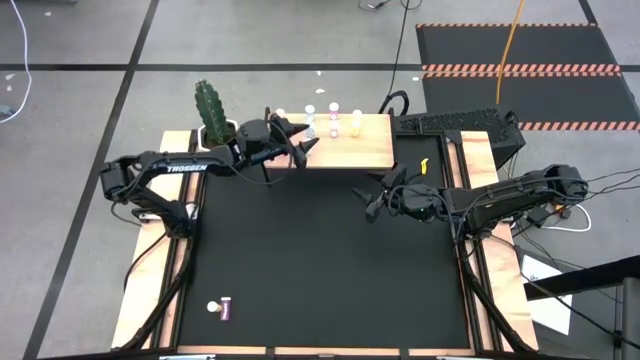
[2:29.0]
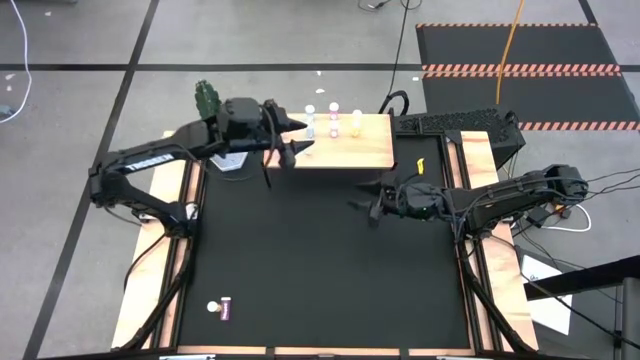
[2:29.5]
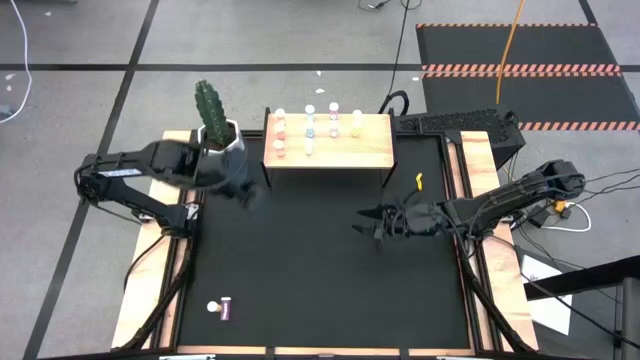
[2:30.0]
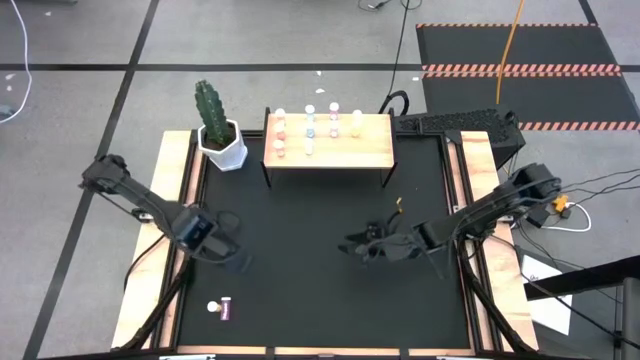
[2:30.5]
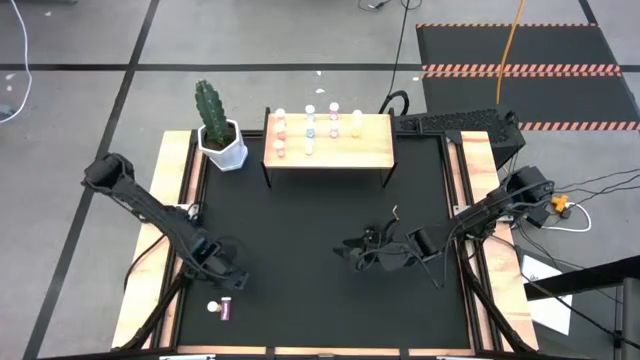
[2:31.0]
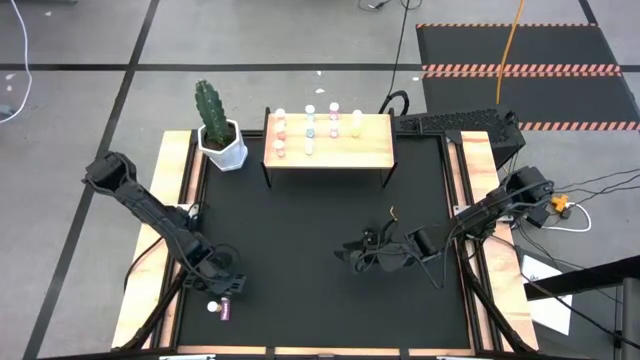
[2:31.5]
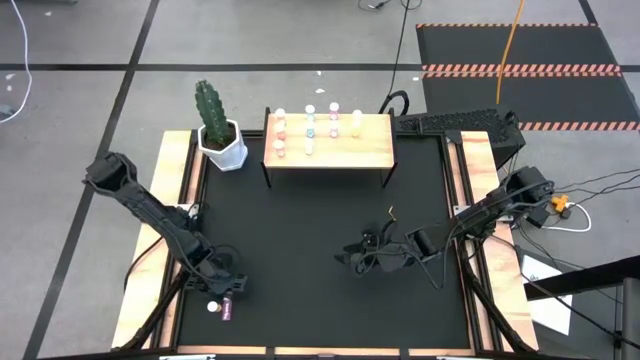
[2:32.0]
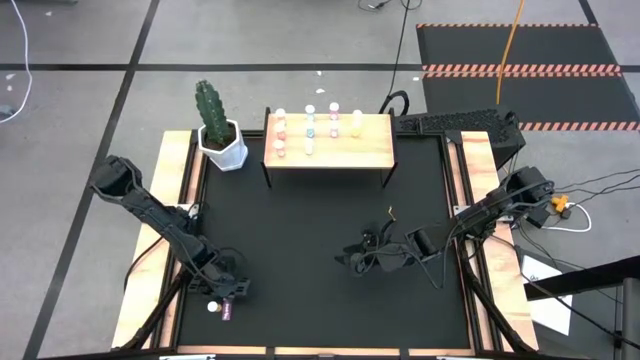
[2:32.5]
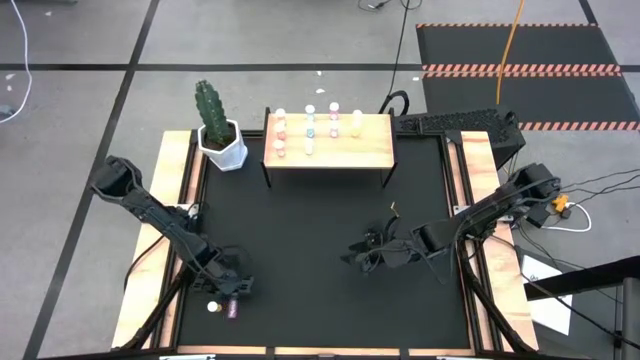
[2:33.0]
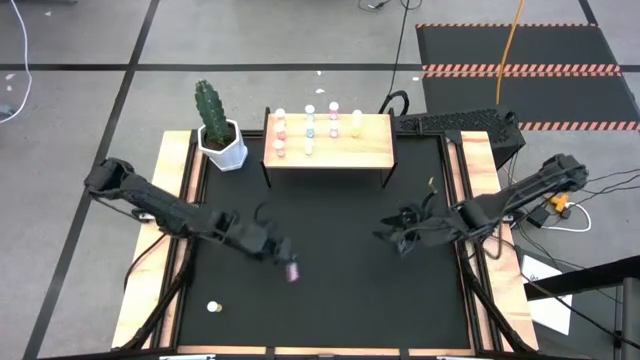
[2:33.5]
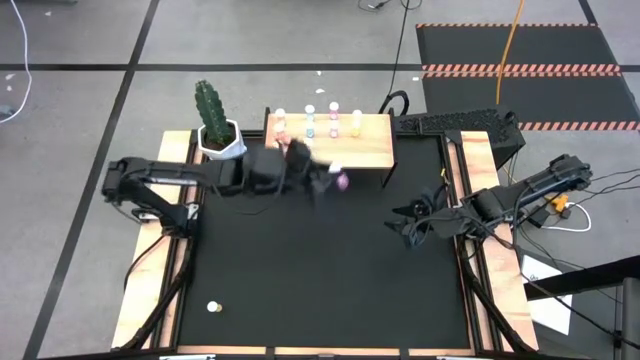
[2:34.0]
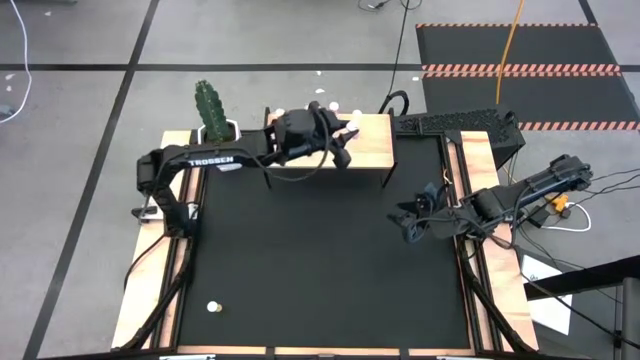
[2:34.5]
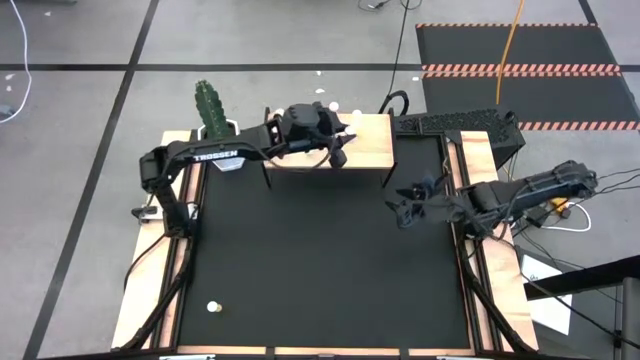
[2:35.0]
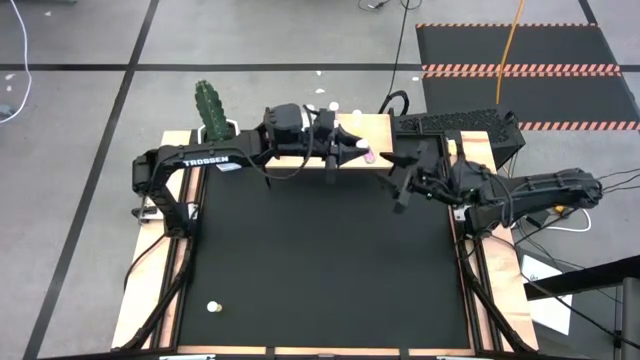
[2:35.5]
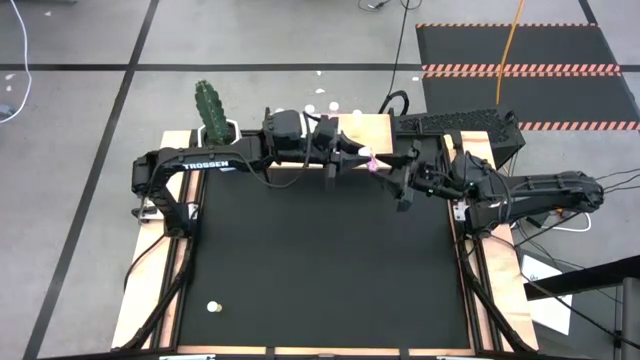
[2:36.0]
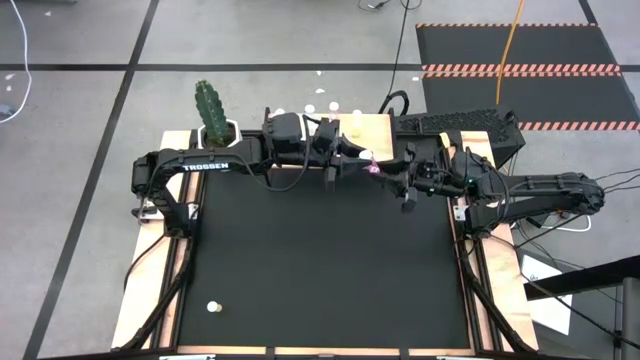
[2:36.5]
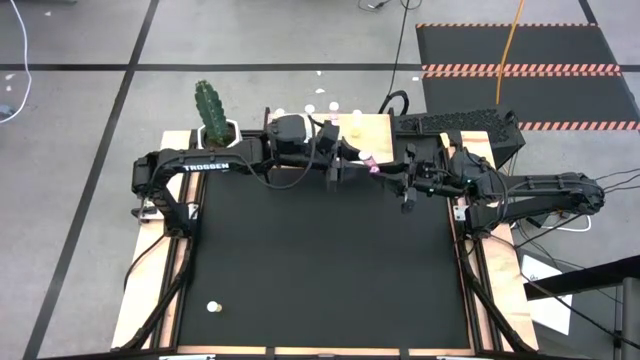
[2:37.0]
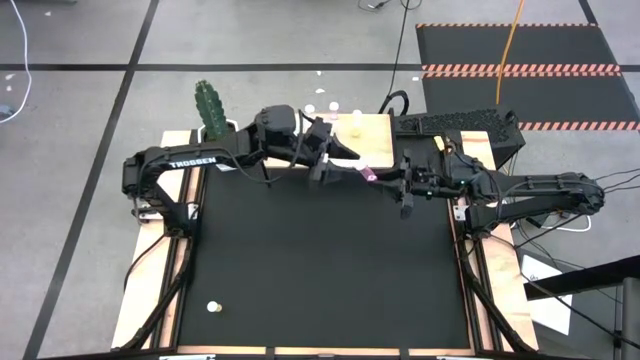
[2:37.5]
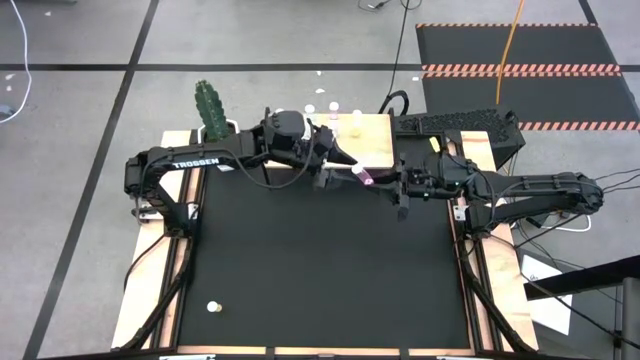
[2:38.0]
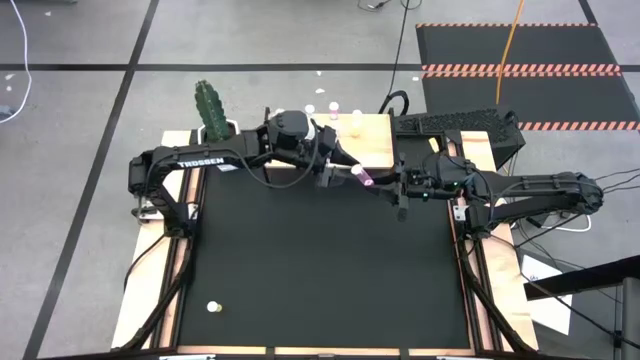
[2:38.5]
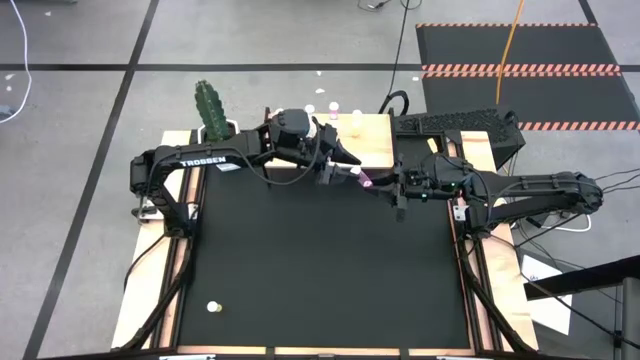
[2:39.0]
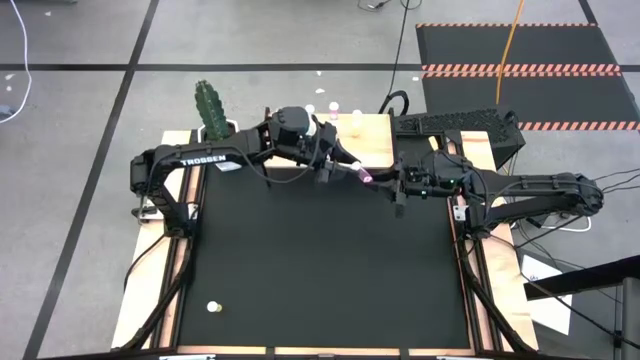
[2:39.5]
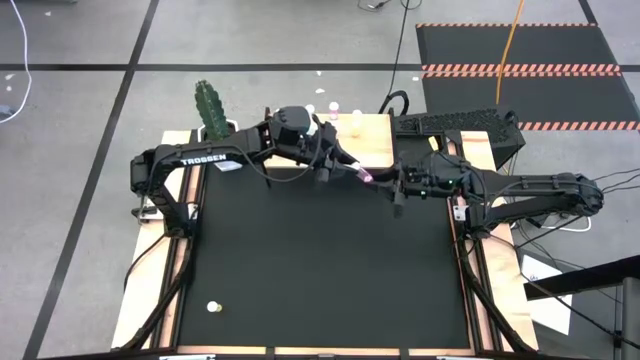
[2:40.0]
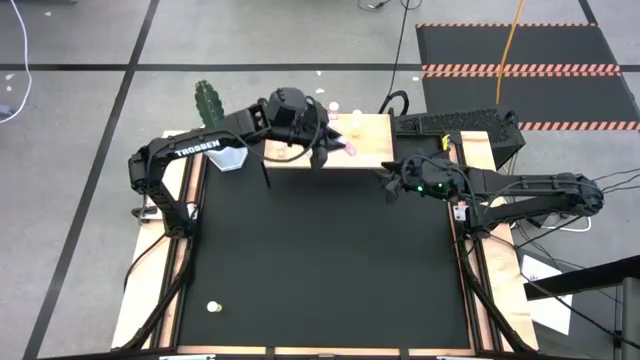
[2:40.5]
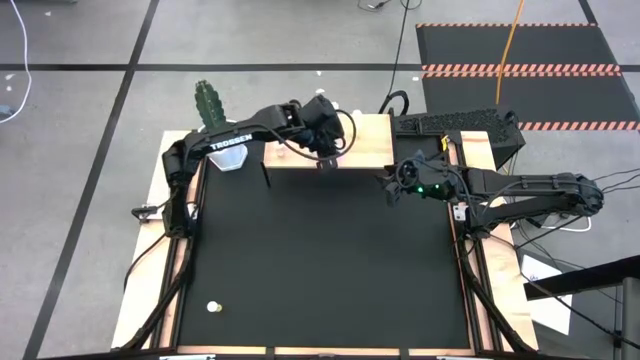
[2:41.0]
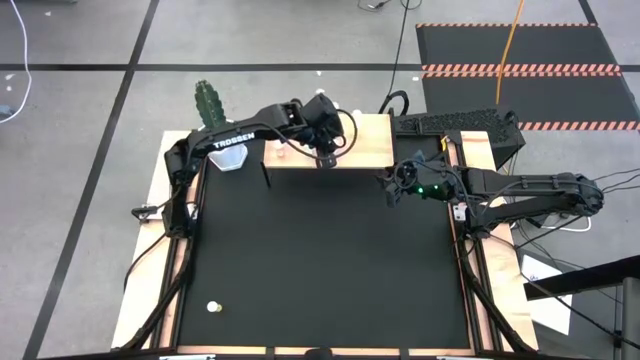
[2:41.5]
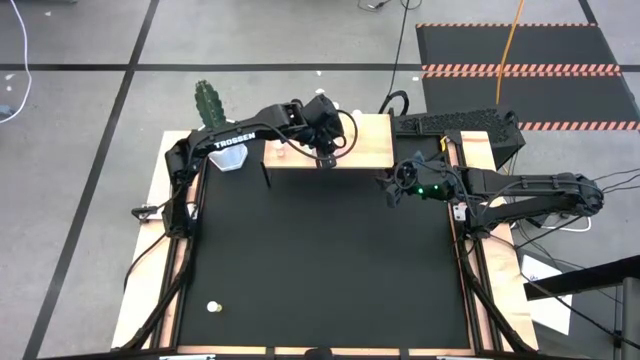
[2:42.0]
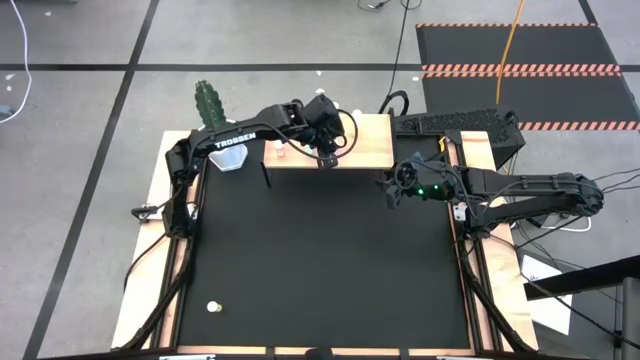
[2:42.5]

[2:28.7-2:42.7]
Task: Pick and place medicine bottles onto shelf by color
Put the pink pill bottle aligned with the other pink pill bottles on the shelf

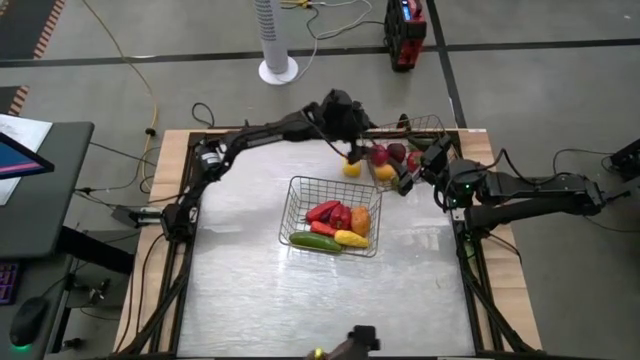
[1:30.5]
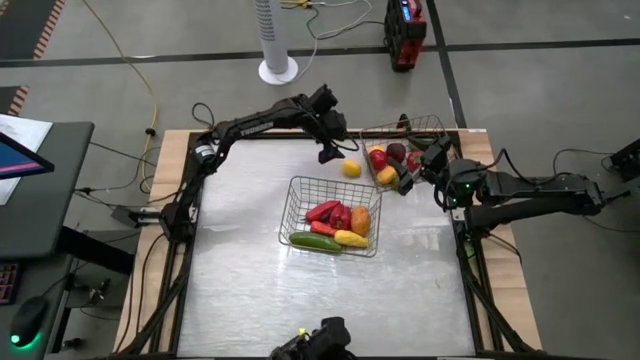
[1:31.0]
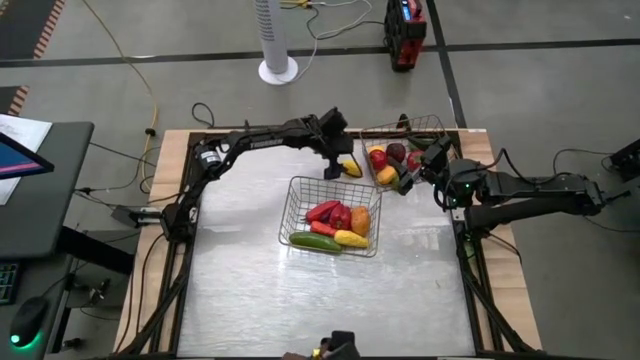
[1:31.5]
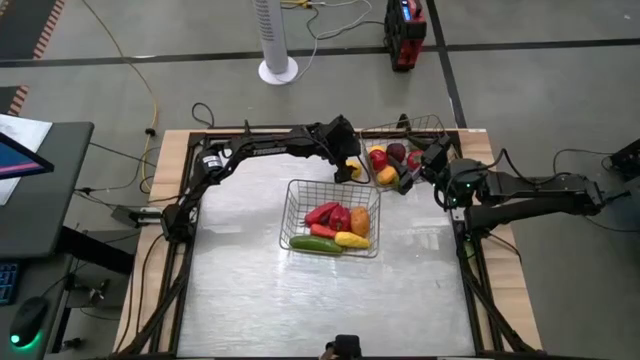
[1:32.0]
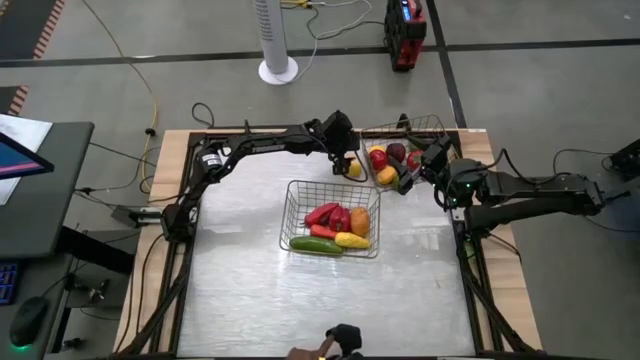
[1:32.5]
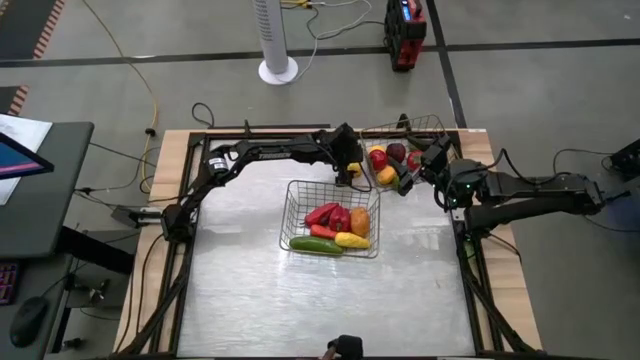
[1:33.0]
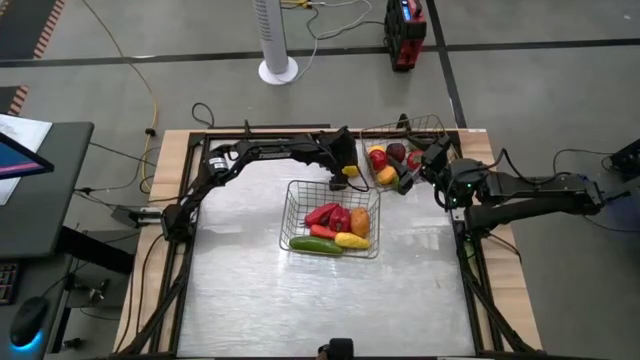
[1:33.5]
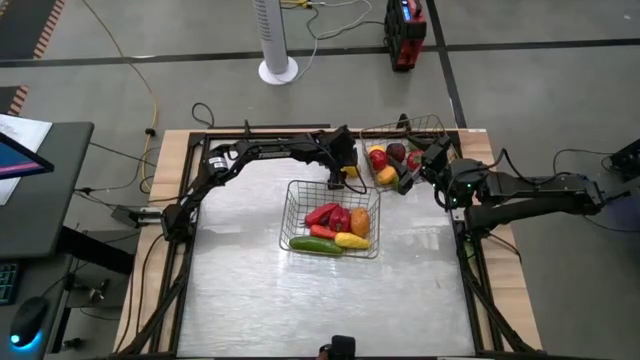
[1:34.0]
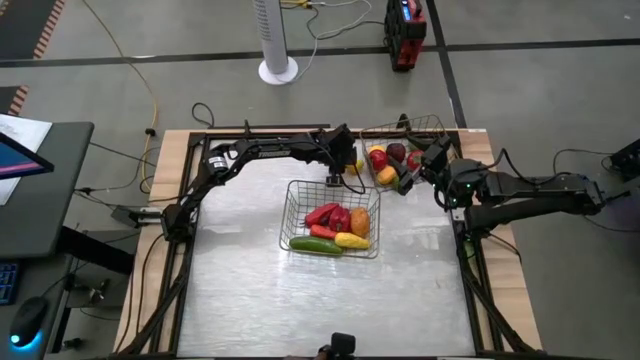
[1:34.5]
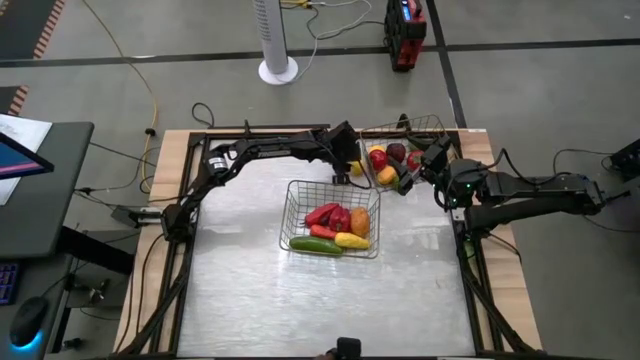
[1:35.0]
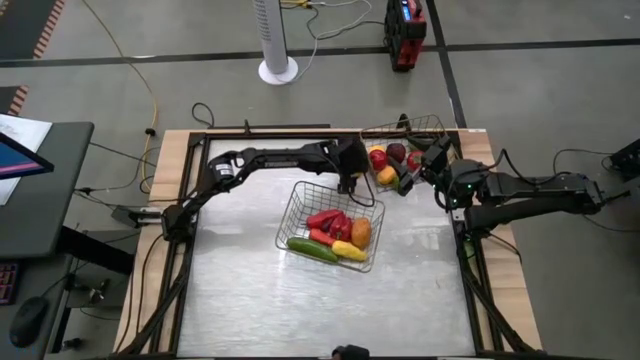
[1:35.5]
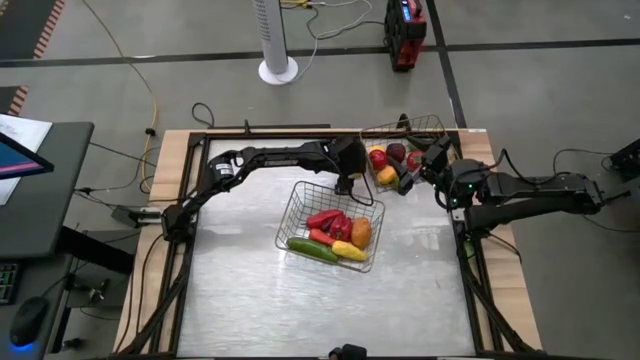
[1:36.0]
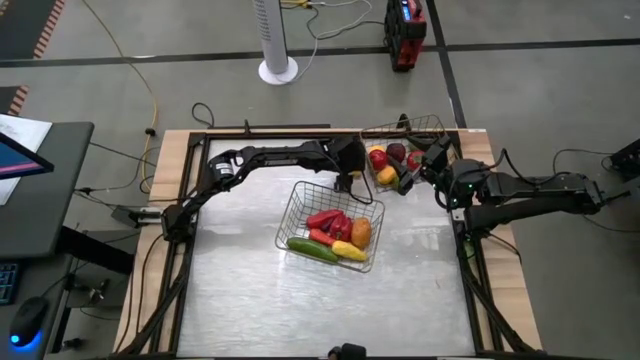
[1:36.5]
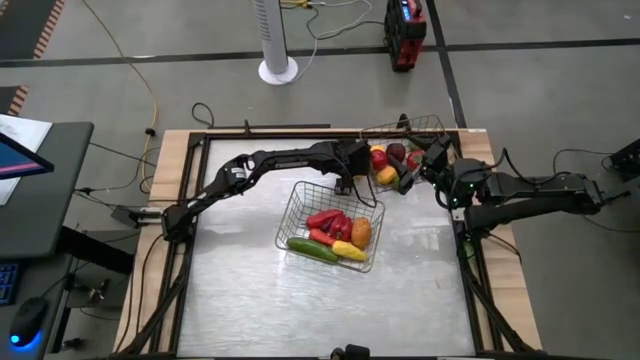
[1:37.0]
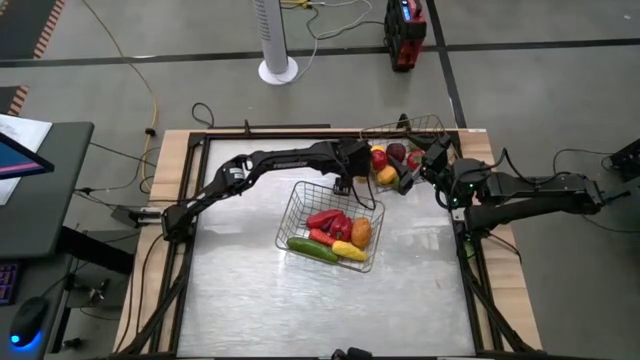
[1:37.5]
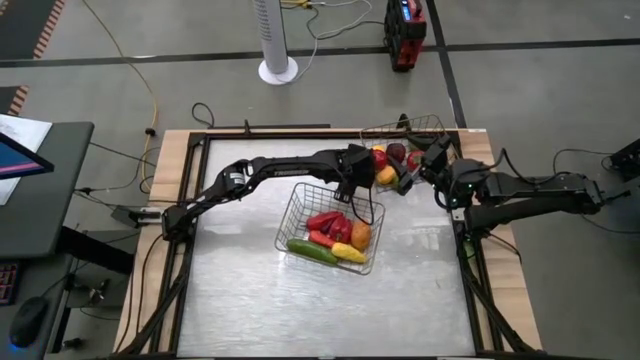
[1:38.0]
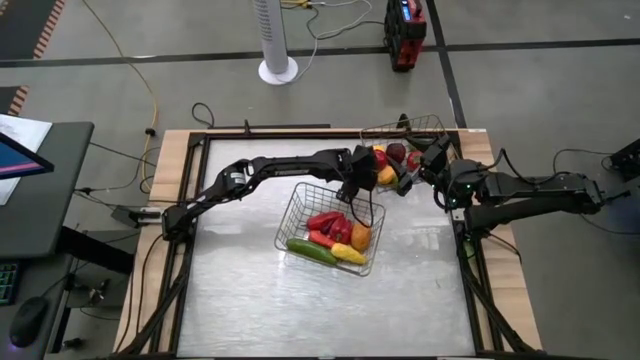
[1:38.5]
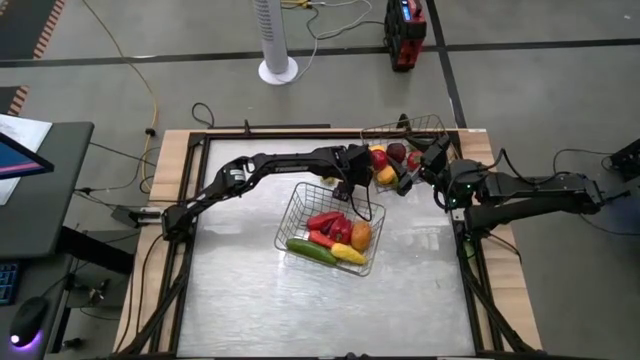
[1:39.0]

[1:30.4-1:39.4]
Task: Sort produce into baskets
Put the yellow lemon into the right wire basket
